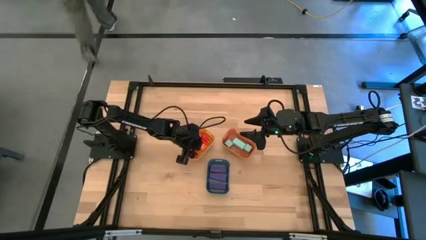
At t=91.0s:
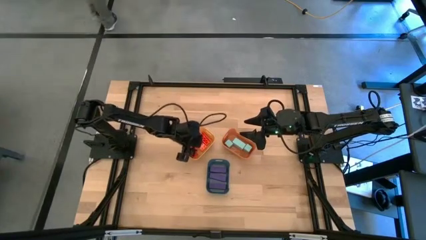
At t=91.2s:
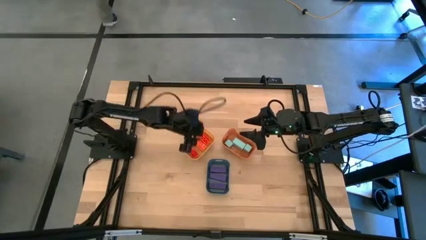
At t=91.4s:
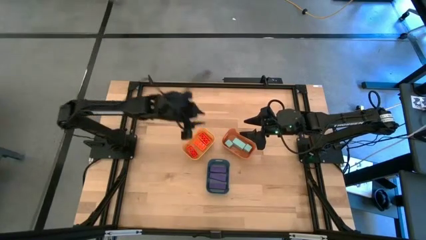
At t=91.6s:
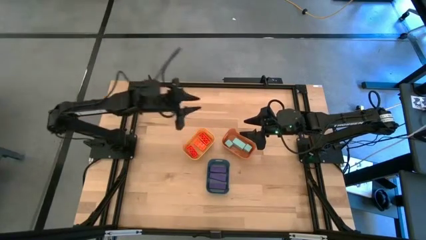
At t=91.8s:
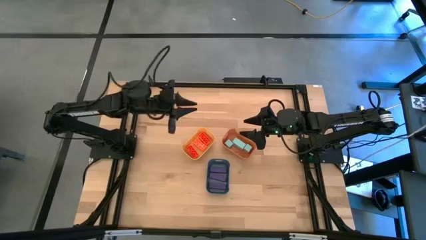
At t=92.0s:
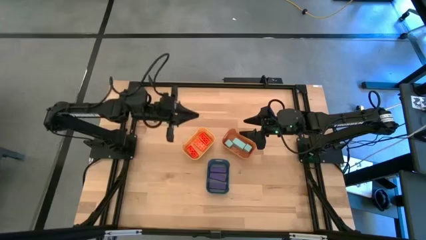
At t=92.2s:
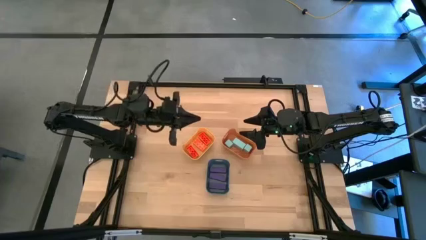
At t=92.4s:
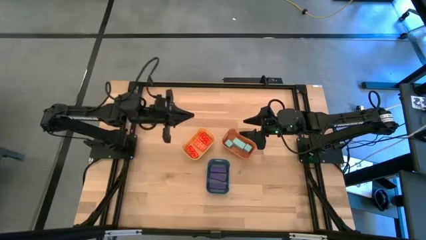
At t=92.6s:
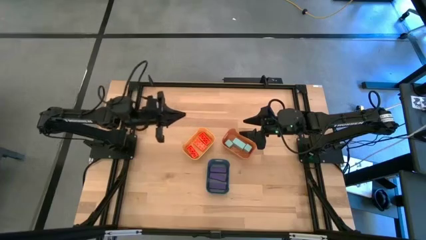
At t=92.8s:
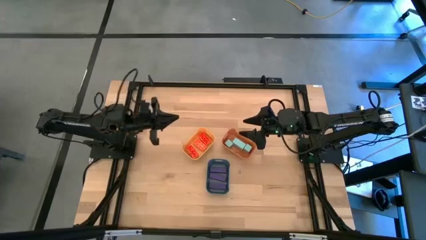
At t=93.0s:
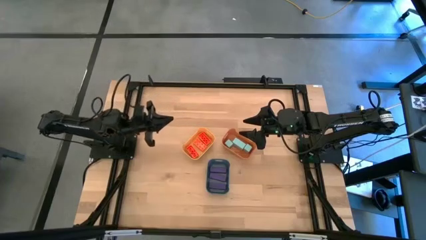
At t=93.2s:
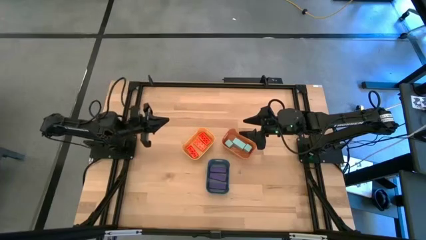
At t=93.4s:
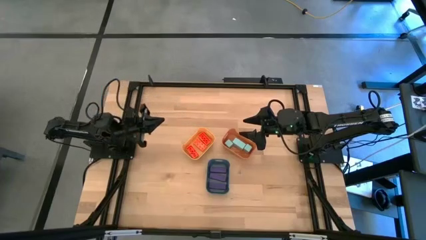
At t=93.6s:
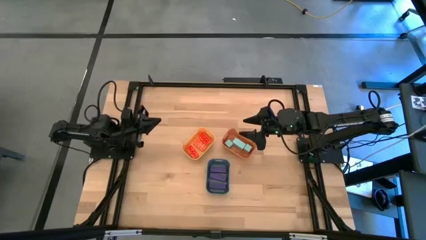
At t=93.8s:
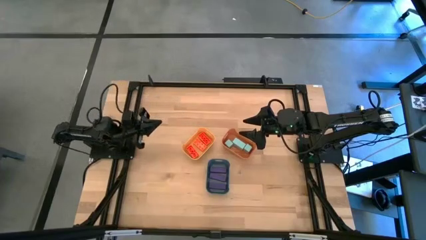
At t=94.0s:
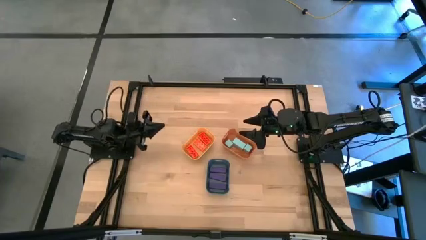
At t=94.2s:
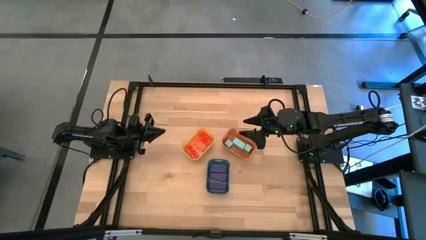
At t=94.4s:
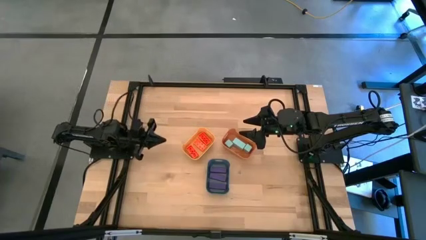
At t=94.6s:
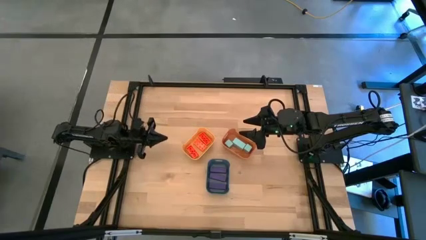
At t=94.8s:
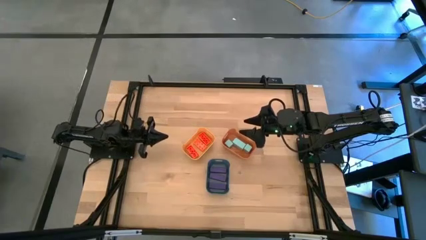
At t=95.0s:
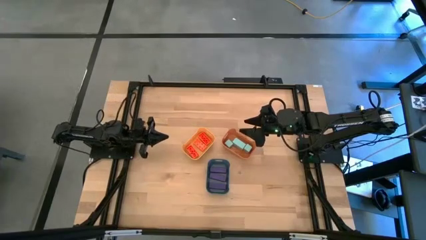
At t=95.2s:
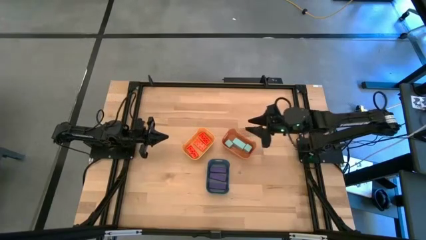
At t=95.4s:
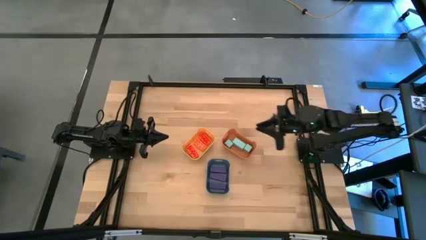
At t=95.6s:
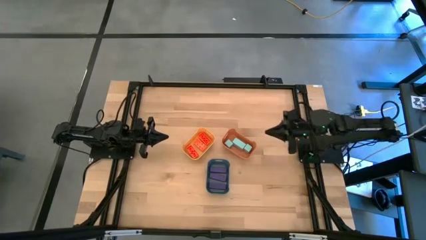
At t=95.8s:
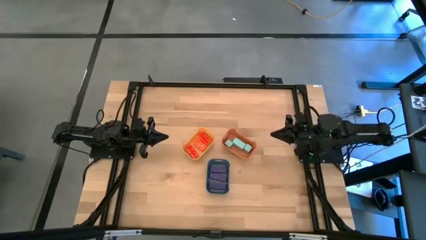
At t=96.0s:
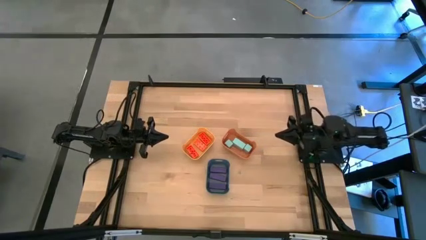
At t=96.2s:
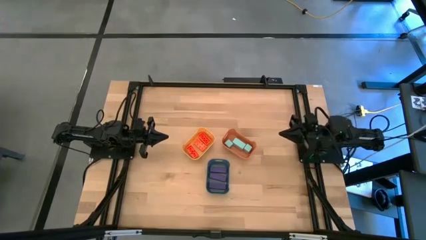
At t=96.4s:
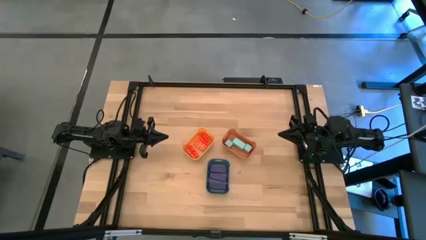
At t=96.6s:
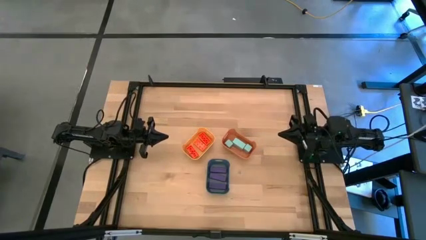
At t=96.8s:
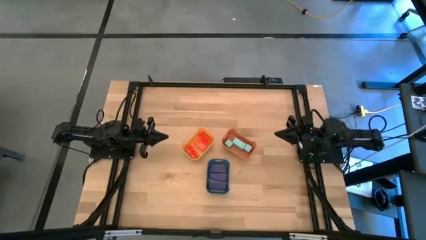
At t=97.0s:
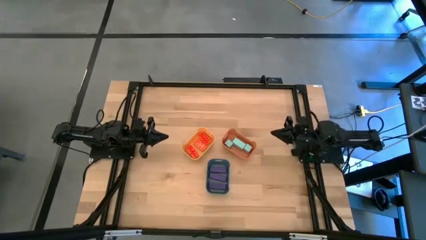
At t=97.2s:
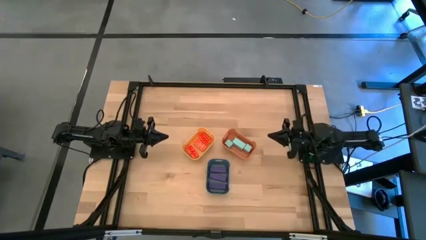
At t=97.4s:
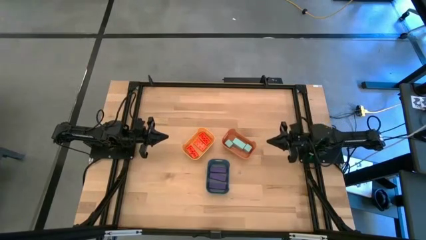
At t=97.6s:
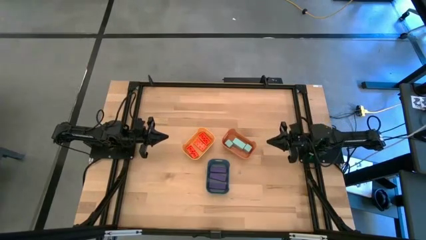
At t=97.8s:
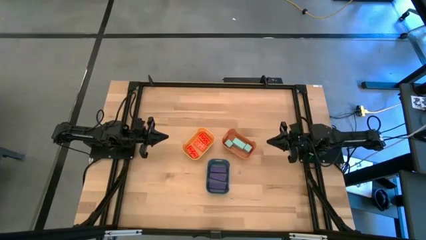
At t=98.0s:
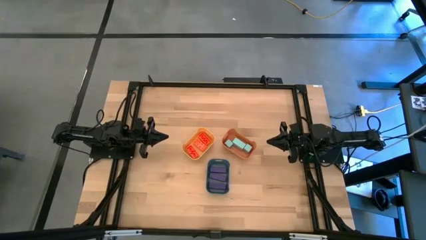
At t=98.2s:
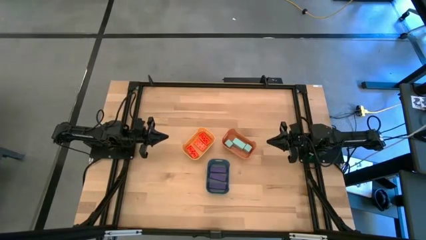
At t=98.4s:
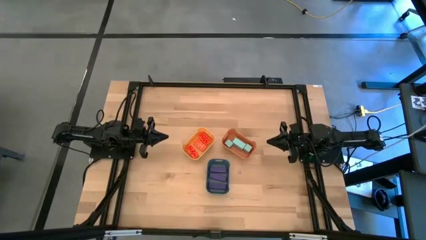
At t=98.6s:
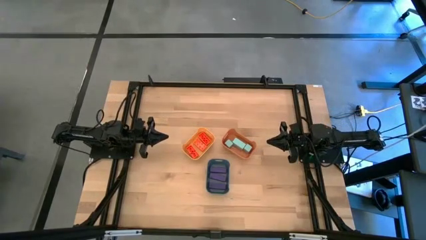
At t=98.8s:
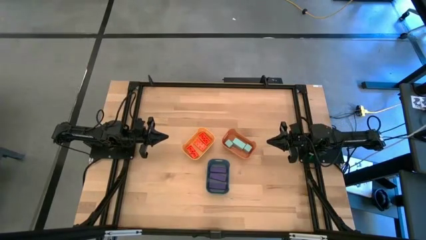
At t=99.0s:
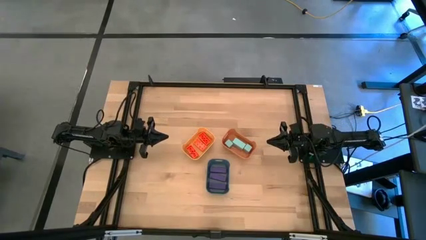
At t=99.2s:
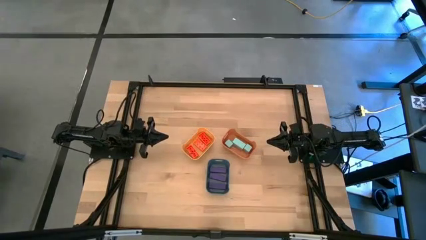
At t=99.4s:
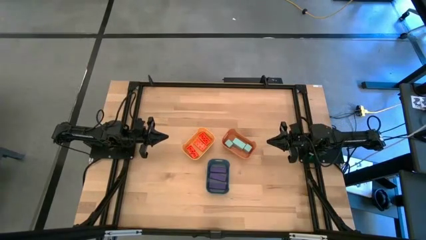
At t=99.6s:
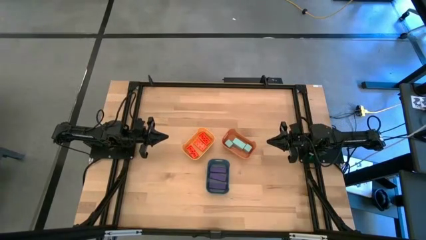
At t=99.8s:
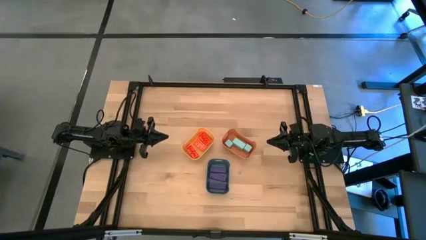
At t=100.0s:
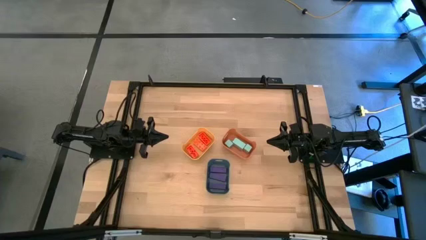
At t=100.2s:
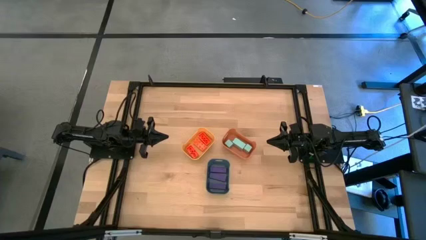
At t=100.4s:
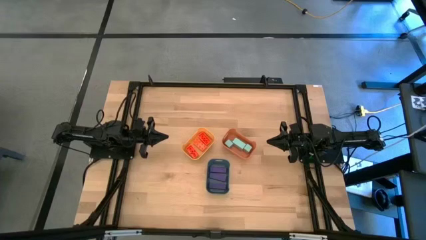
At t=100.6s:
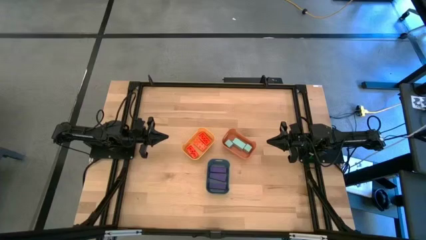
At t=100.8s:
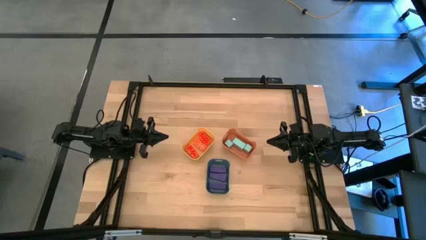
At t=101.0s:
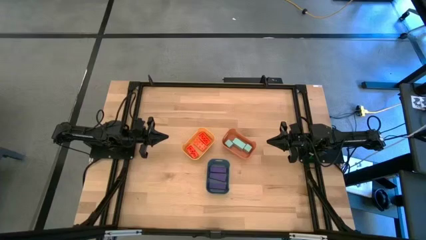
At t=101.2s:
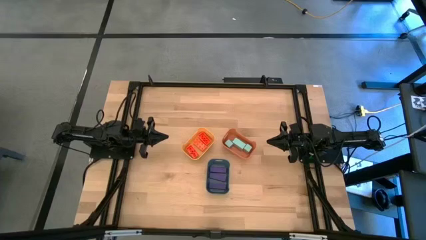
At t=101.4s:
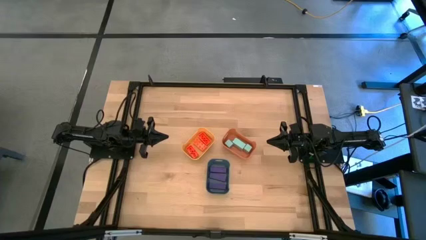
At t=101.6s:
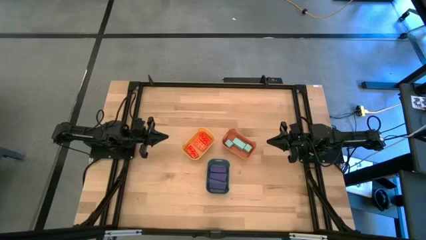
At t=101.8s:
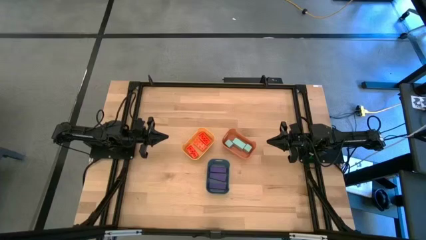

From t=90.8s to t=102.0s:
Task: Sort & place blocks by color
Return to Home Position
